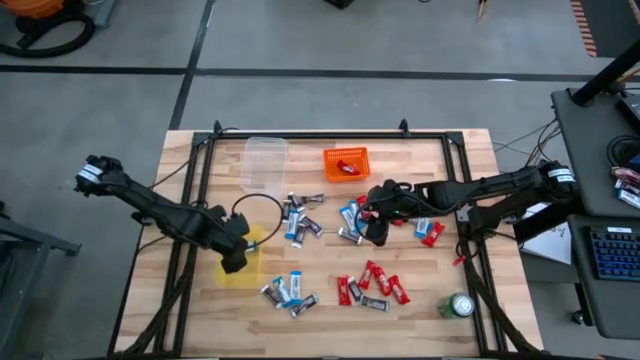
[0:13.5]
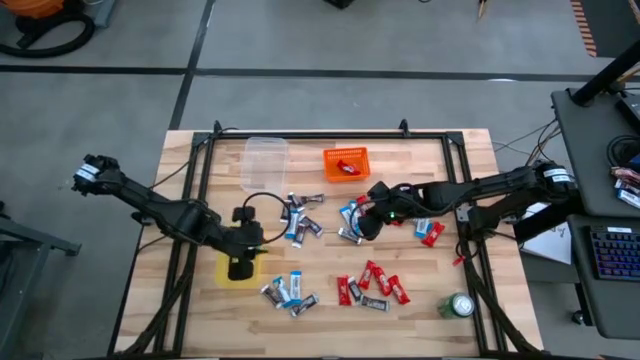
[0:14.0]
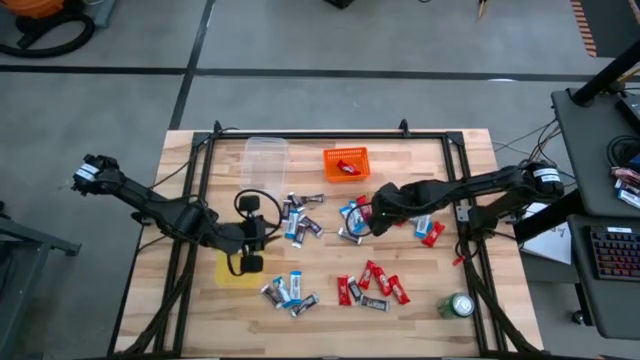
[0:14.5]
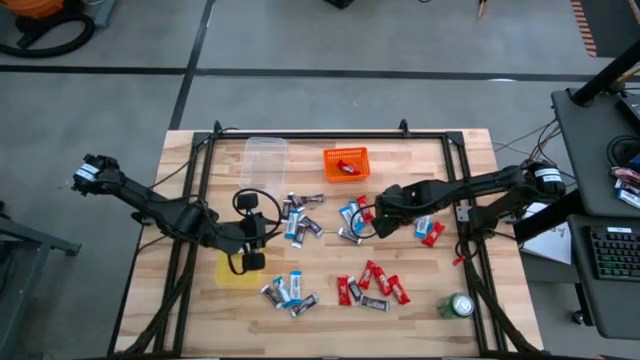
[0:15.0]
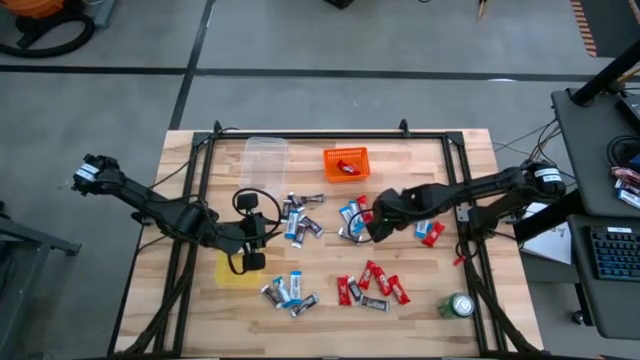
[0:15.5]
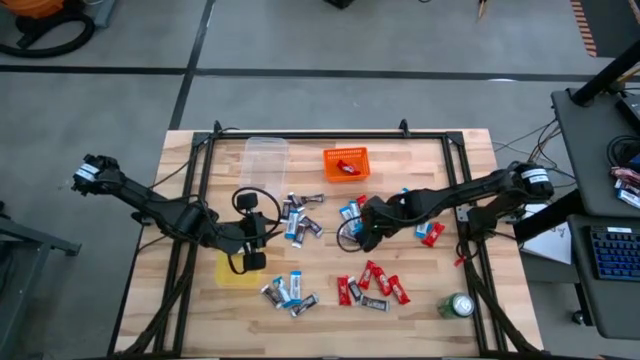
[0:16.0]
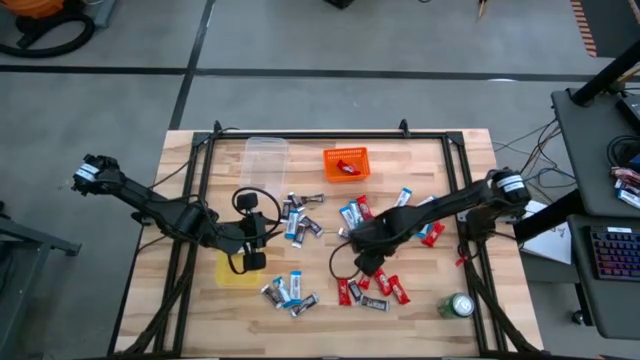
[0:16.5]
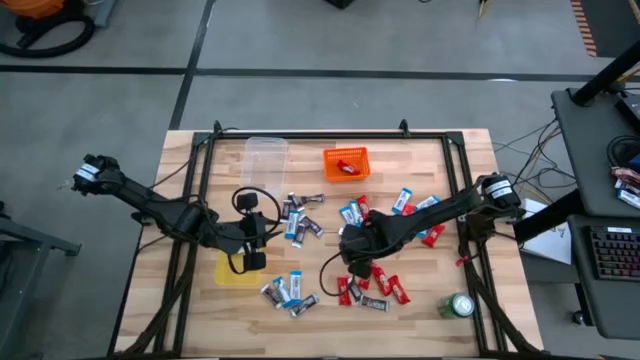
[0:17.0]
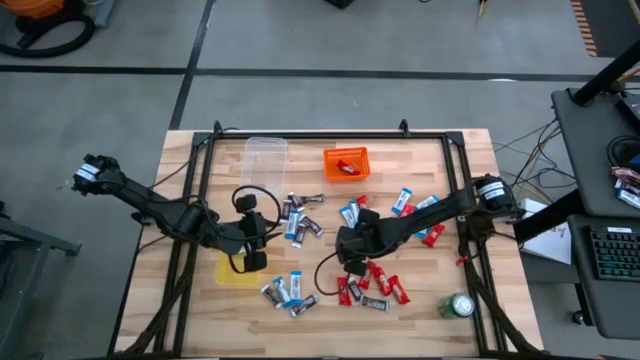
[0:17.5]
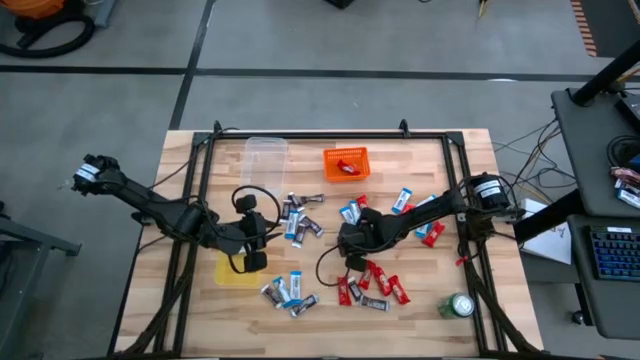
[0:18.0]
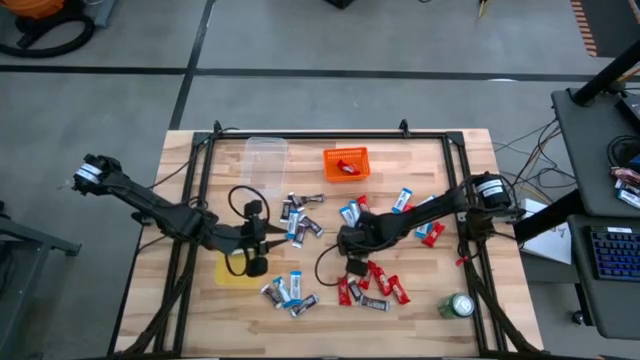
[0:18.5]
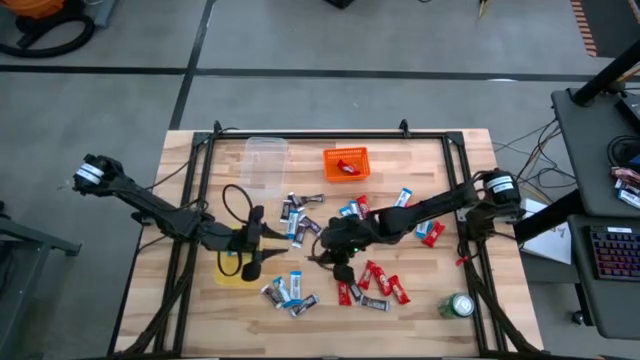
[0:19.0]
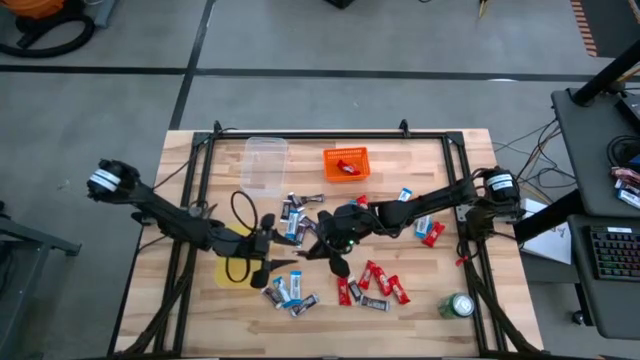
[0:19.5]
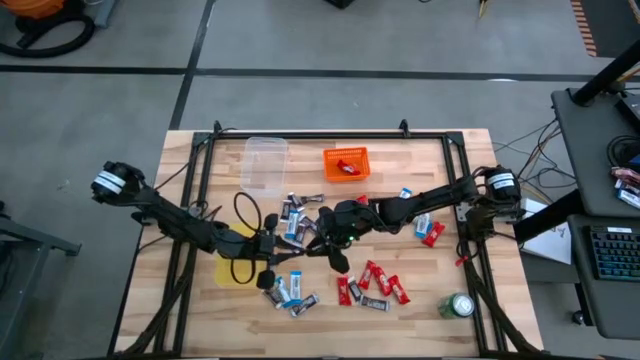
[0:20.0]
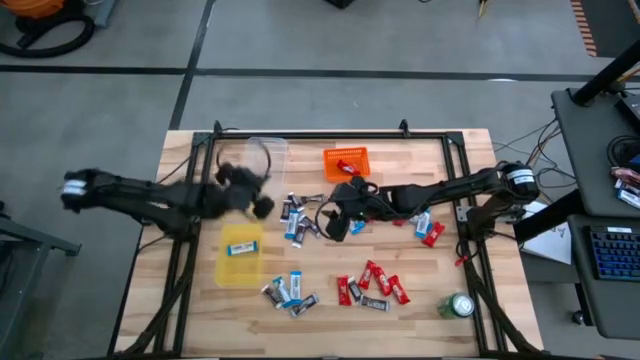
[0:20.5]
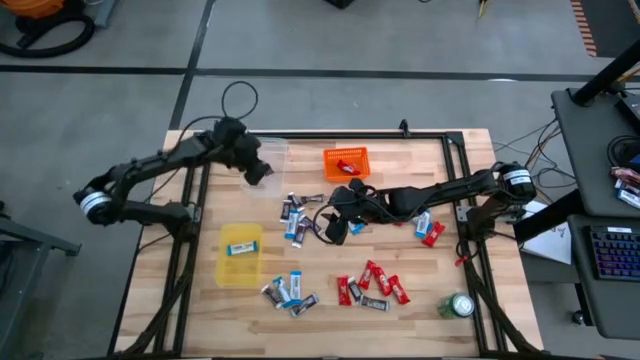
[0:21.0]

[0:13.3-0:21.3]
Task: Sort candy
Put the center brown candy into the transparent bin

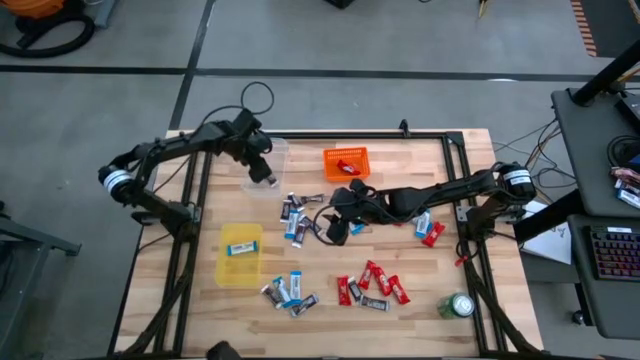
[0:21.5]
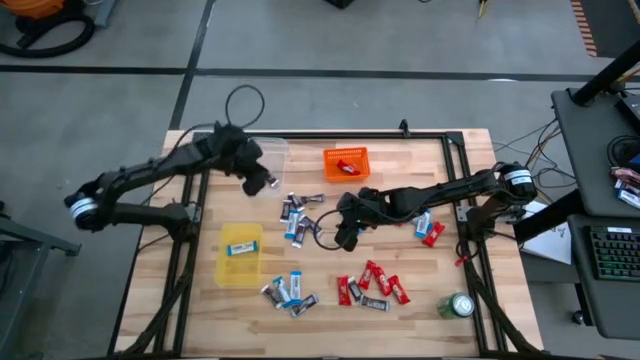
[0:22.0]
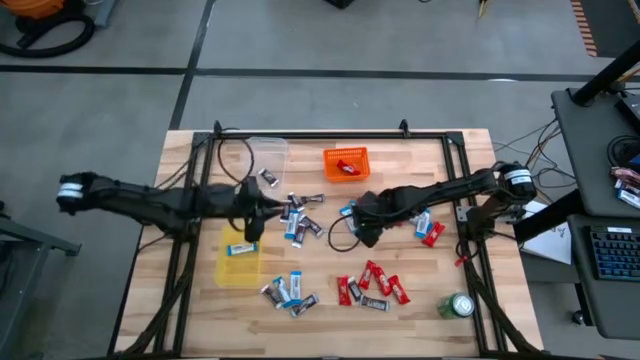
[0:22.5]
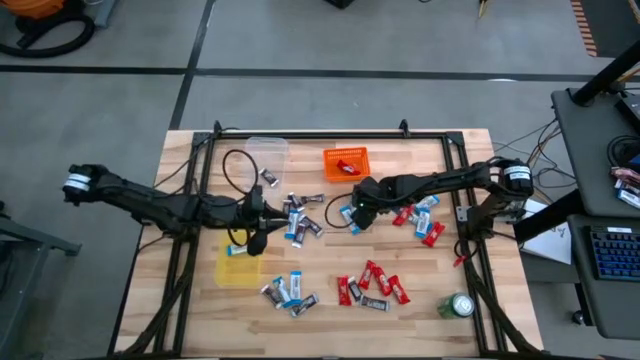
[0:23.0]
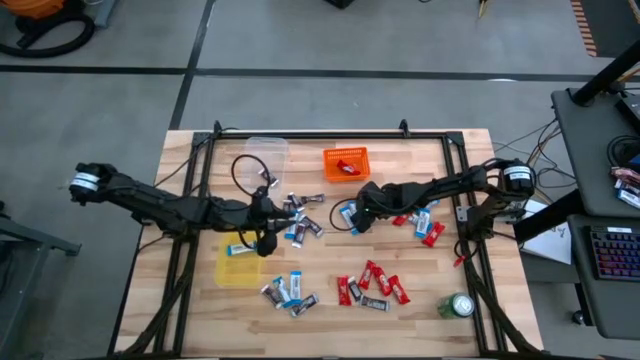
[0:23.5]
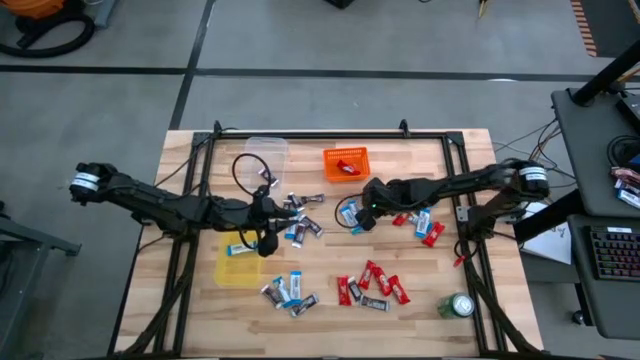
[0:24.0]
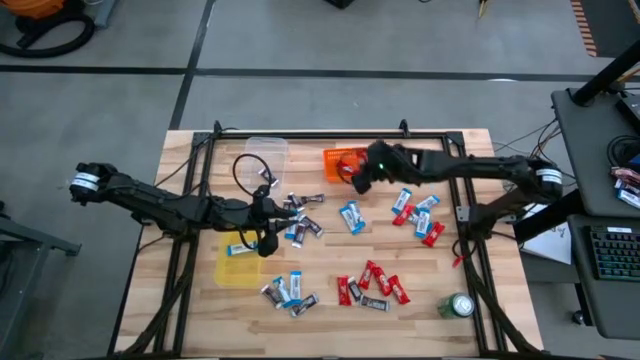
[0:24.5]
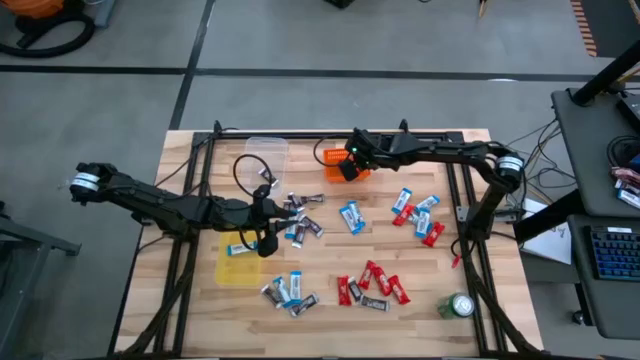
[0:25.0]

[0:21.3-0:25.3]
Put the center red candy into the orange basket

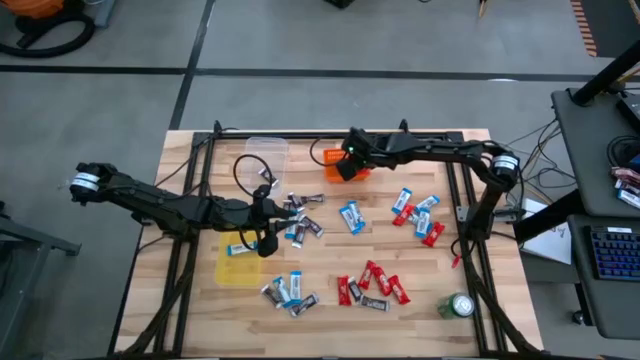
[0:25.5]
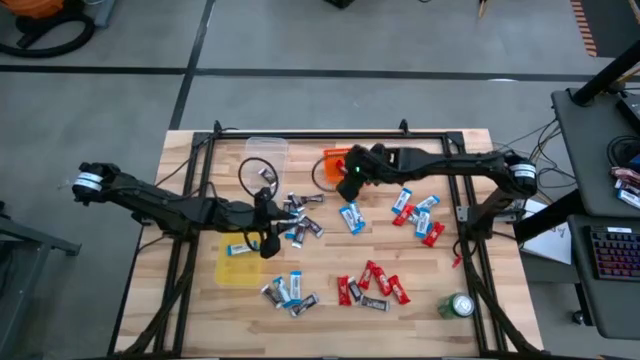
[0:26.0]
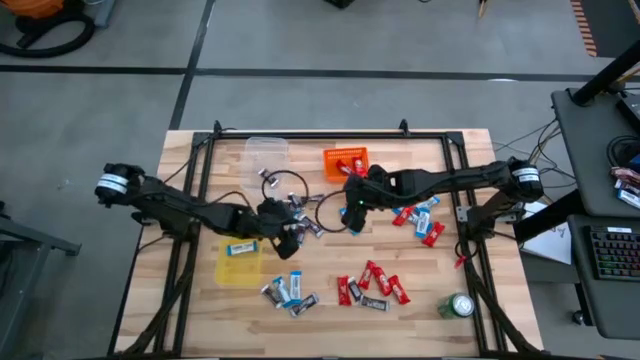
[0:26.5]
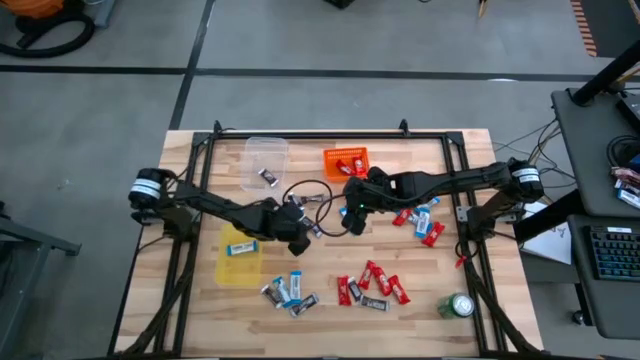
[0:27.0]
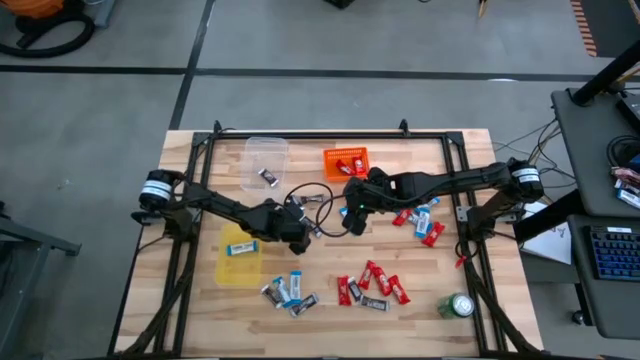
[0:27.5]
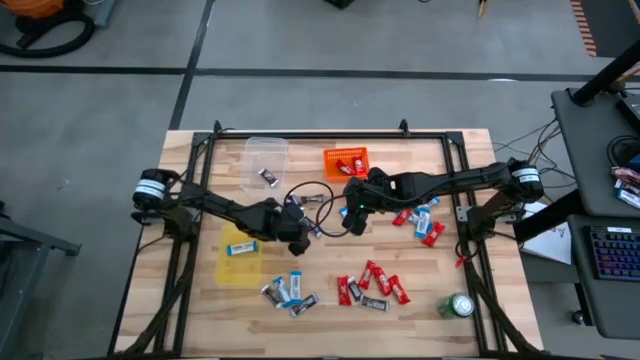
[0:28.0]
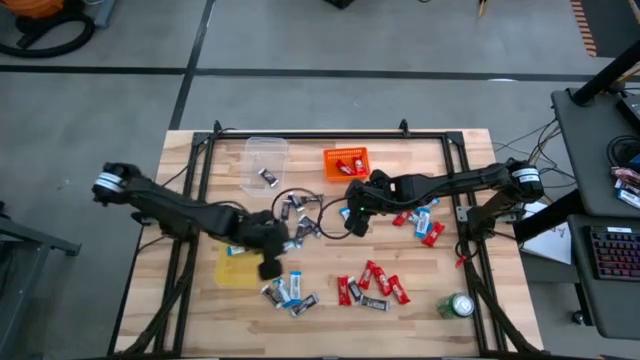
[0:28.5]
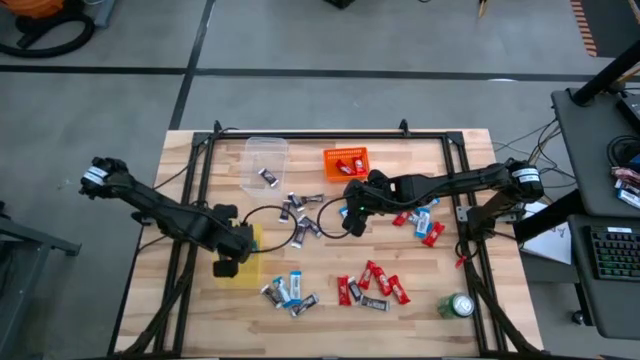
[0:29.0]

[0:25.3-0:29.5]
Put the middle left white candy into the yellow bin

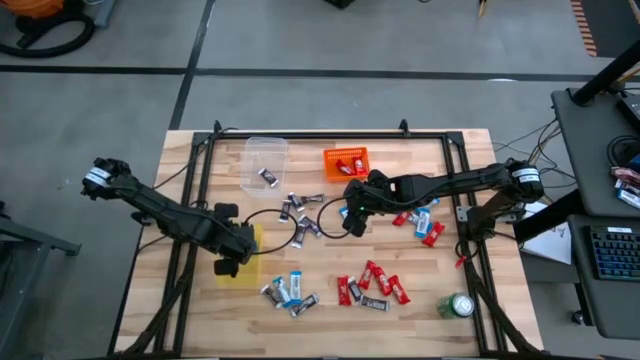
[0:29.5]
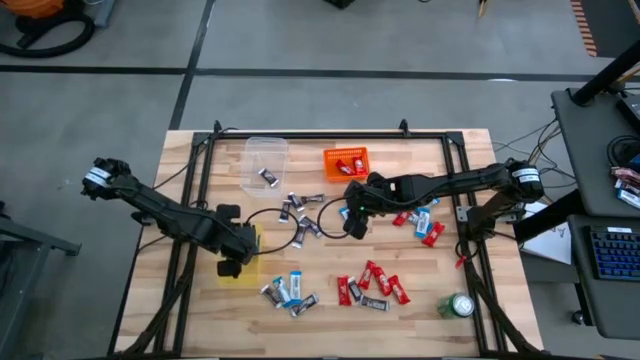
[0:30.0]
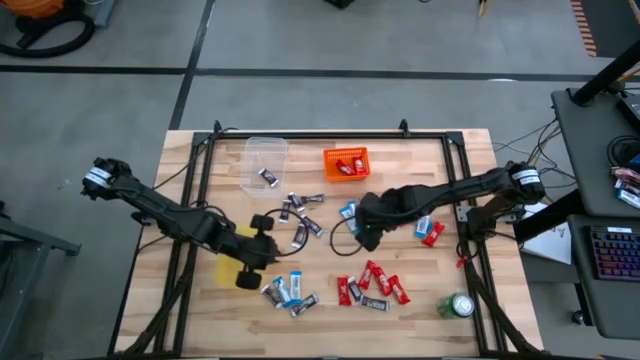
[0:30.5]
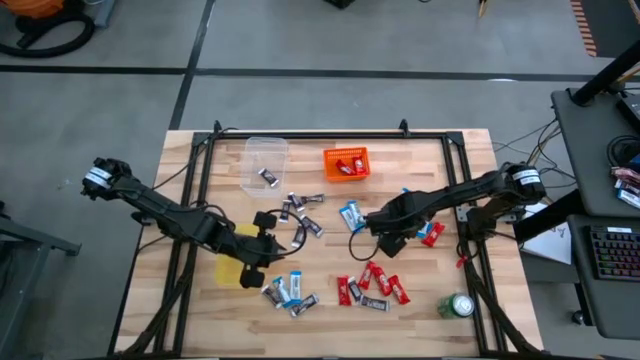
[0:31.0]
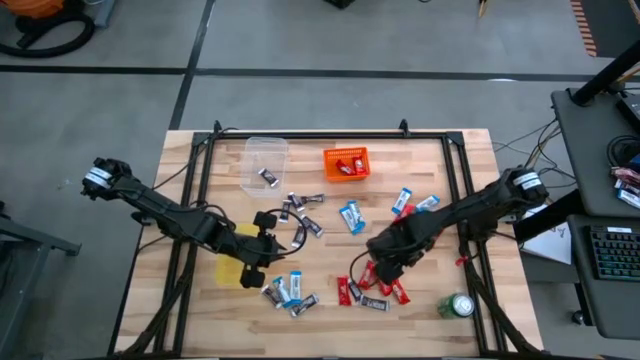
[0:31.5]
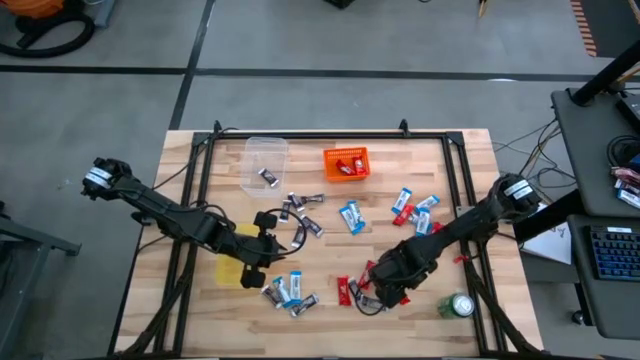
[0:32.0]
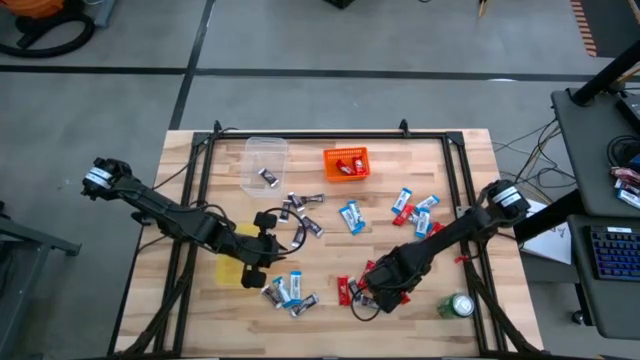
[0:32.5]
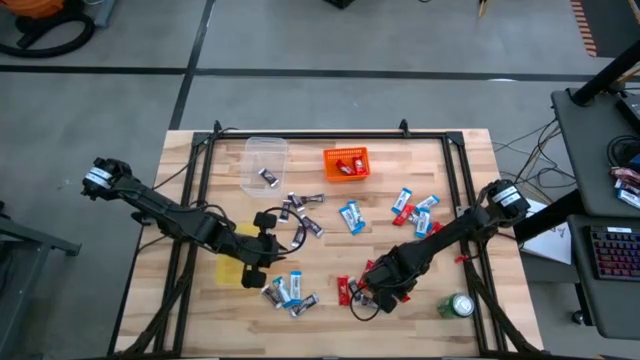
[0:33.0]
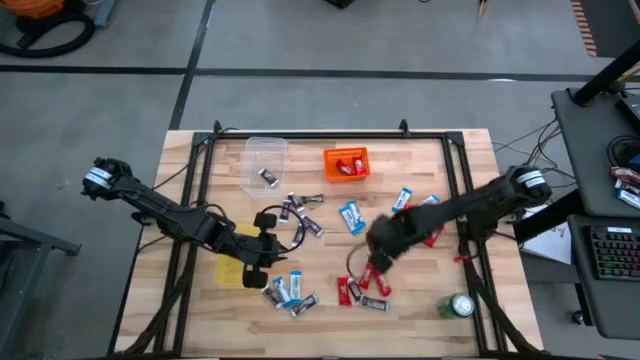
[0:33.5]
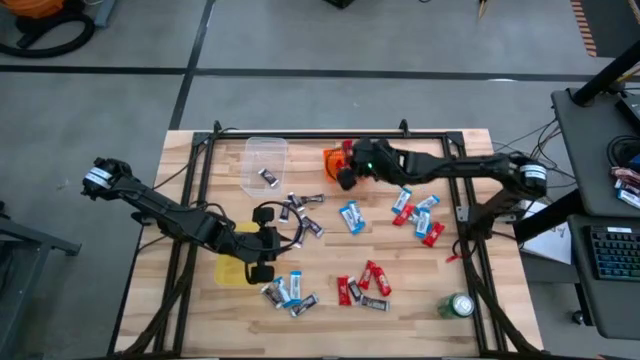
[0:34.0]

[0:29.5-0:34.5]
Put the bottom right red candy into the orange basket
